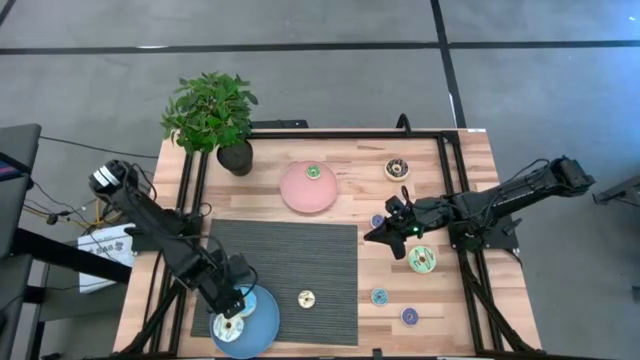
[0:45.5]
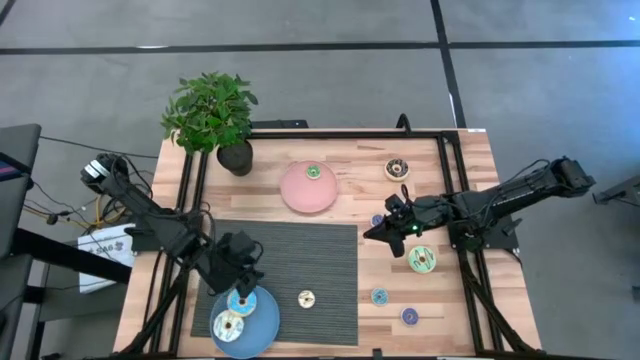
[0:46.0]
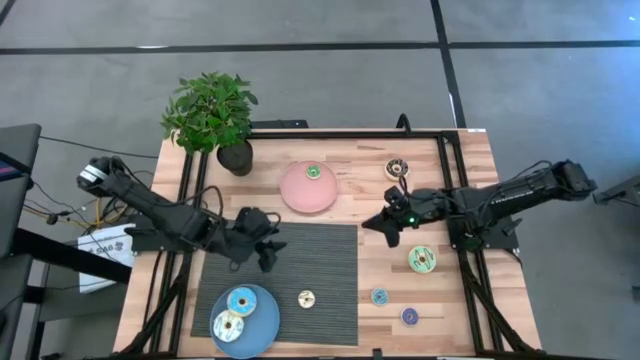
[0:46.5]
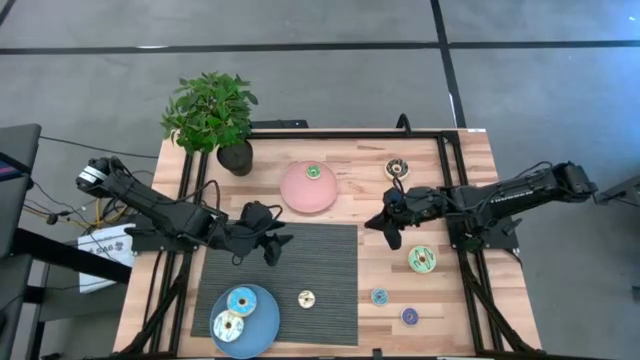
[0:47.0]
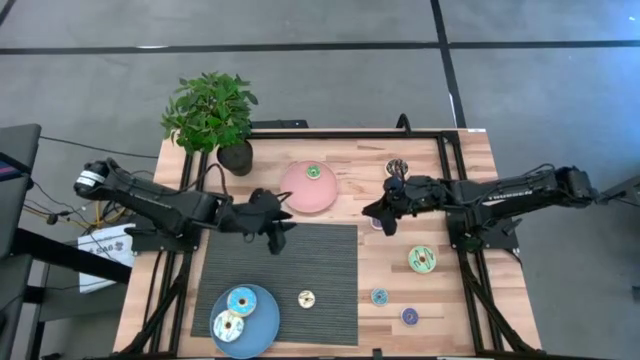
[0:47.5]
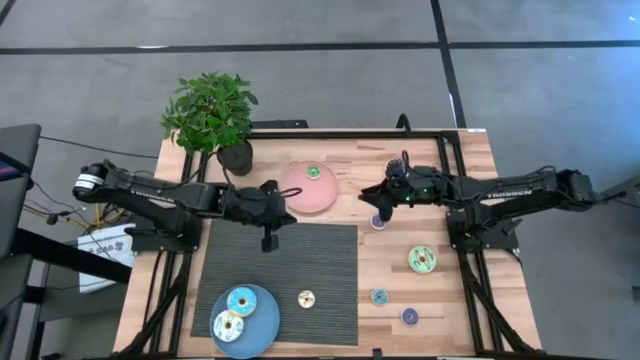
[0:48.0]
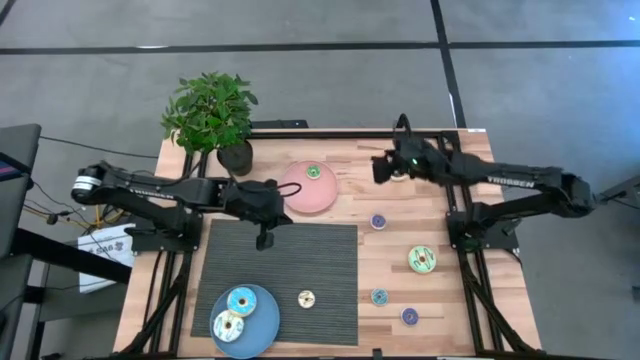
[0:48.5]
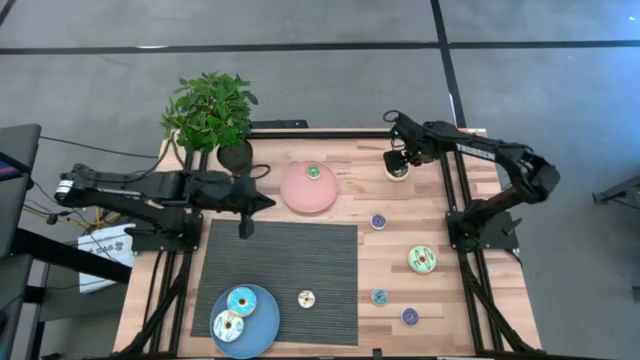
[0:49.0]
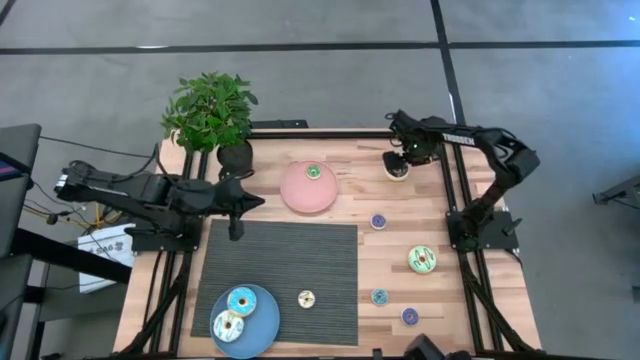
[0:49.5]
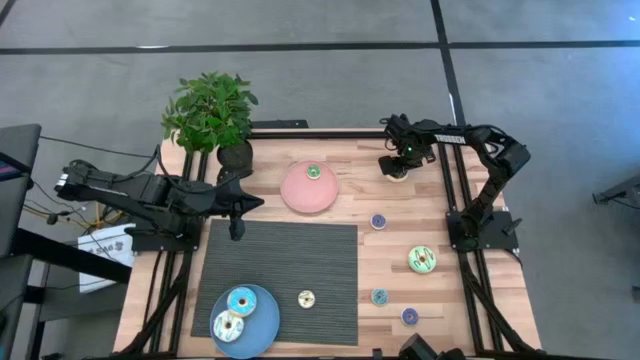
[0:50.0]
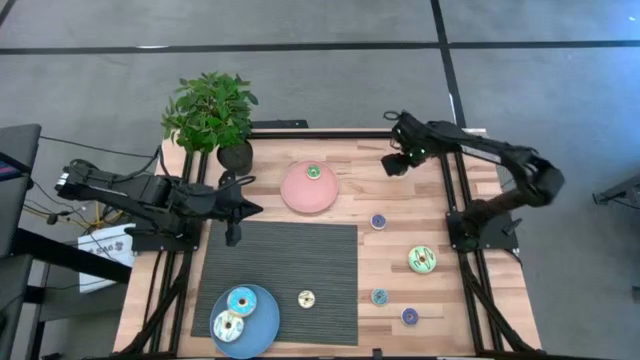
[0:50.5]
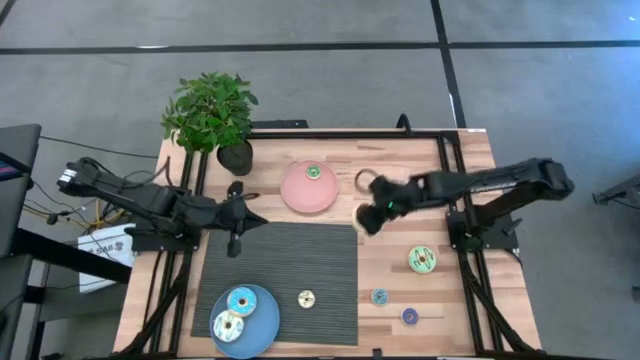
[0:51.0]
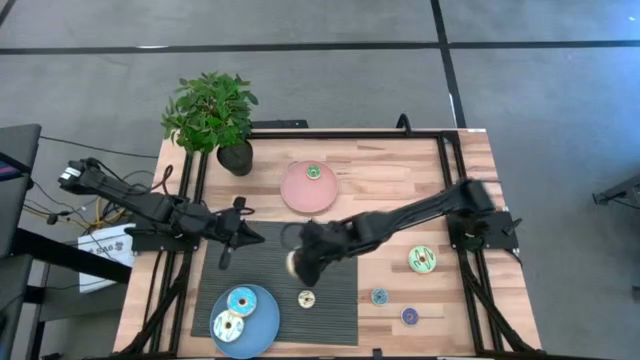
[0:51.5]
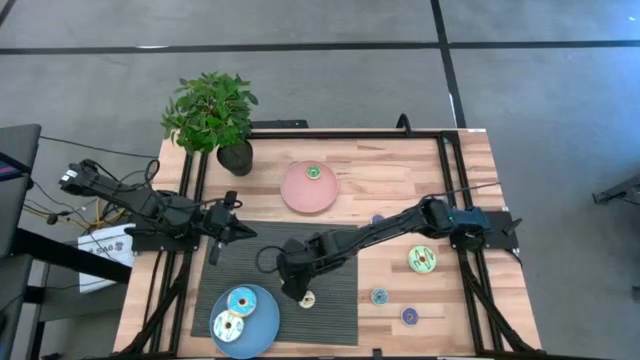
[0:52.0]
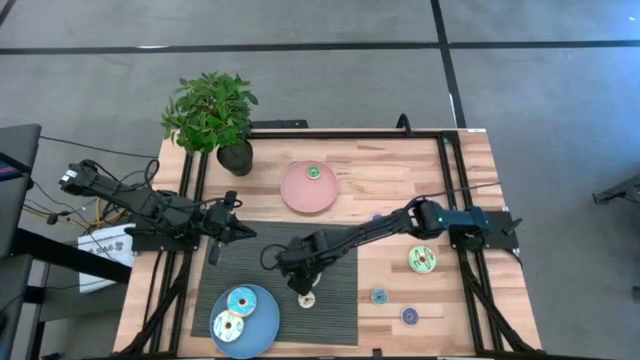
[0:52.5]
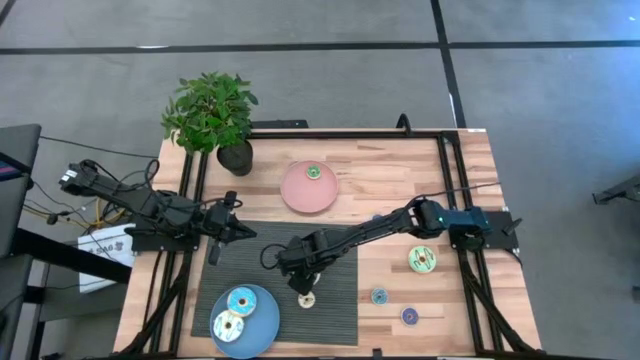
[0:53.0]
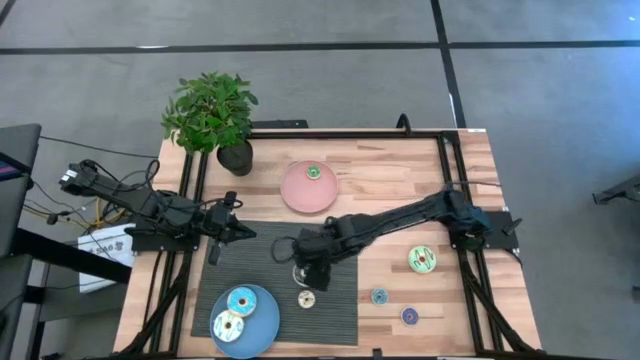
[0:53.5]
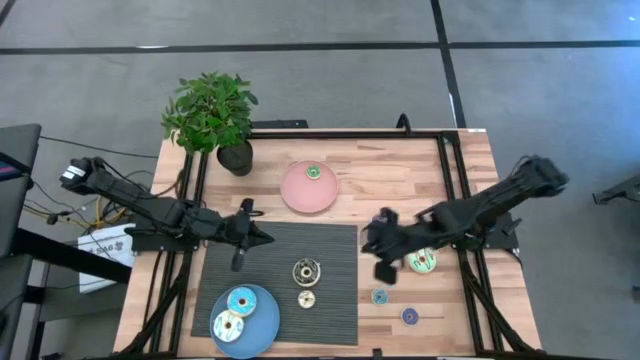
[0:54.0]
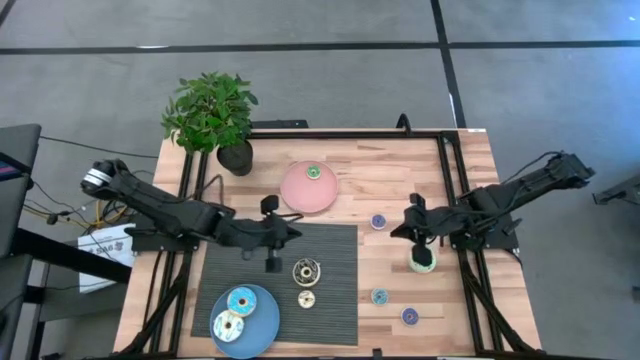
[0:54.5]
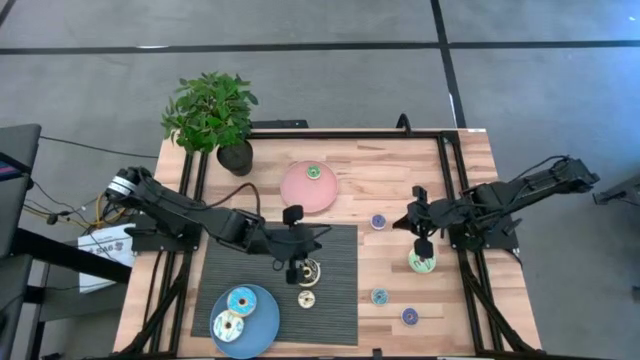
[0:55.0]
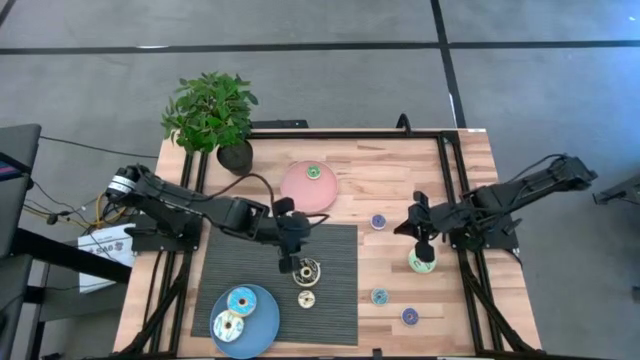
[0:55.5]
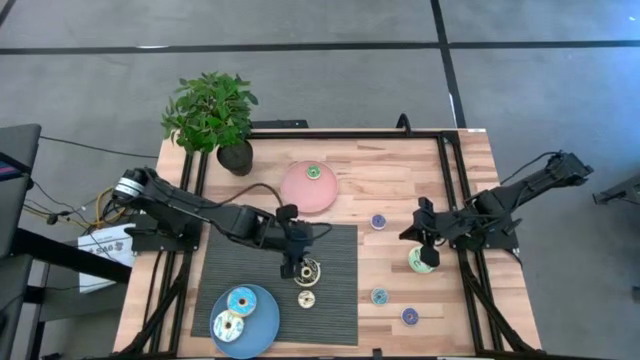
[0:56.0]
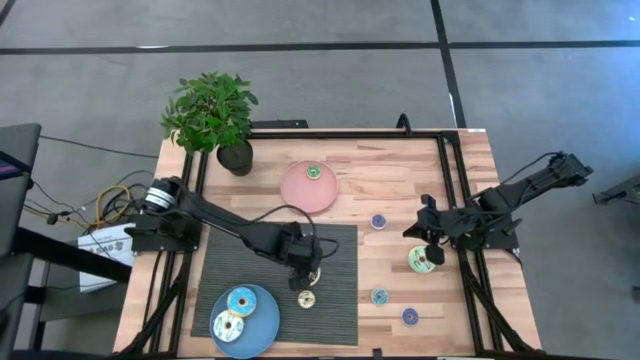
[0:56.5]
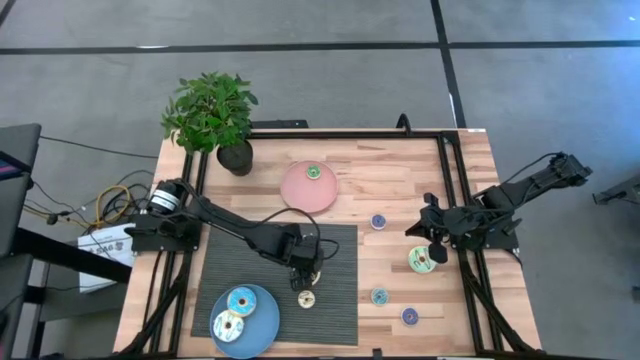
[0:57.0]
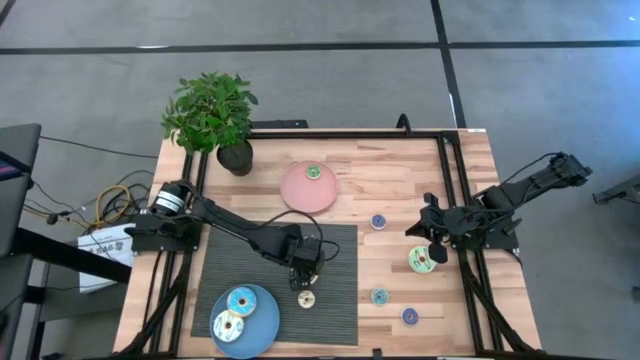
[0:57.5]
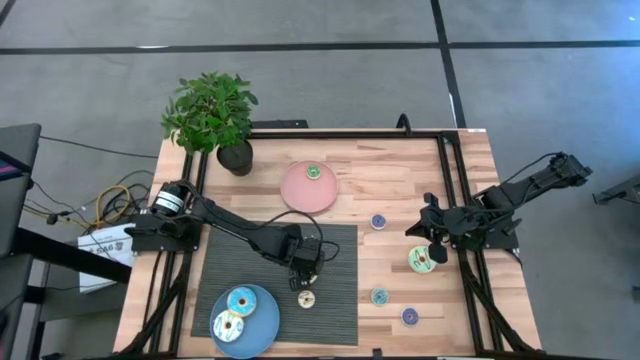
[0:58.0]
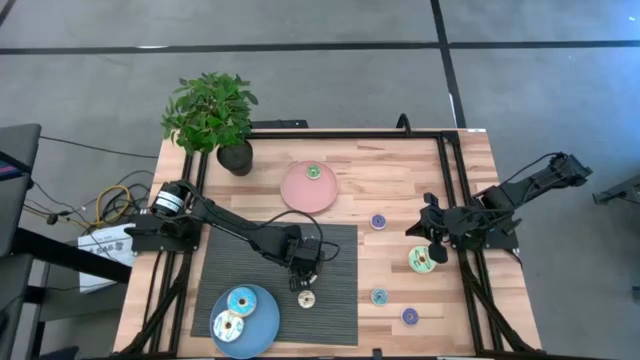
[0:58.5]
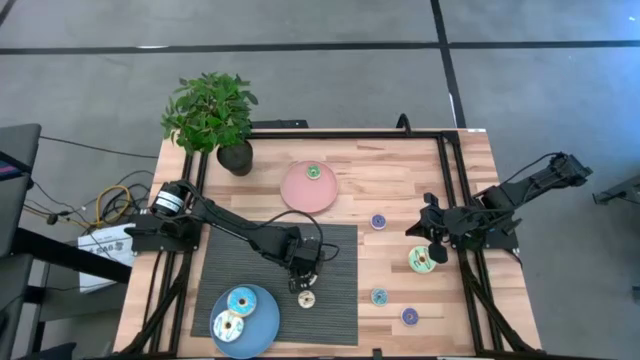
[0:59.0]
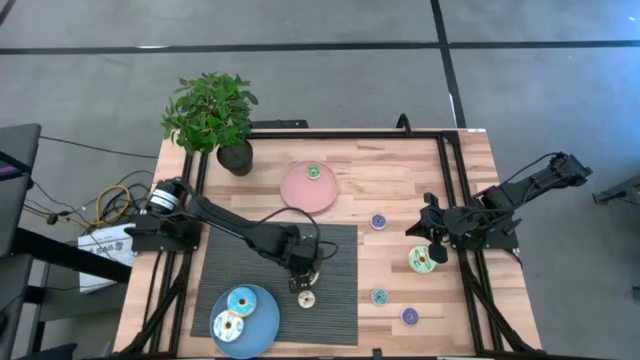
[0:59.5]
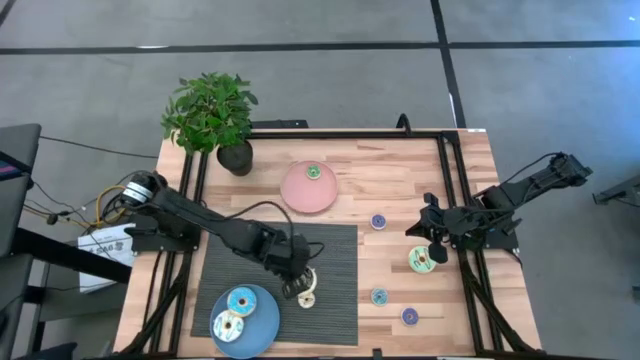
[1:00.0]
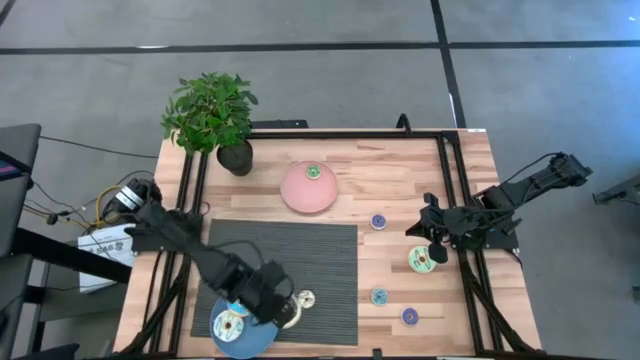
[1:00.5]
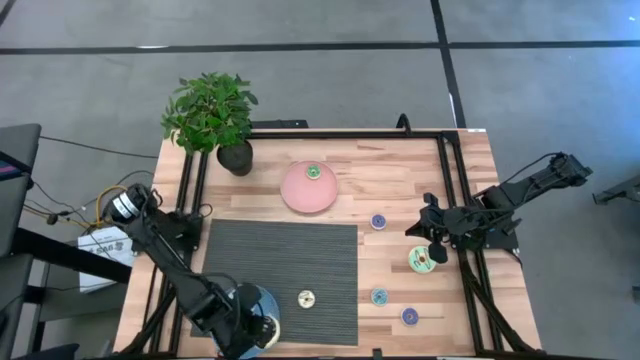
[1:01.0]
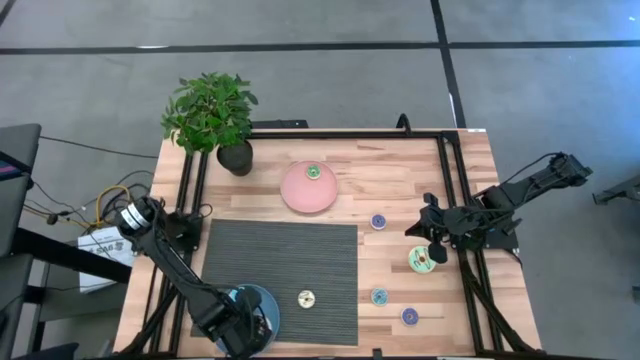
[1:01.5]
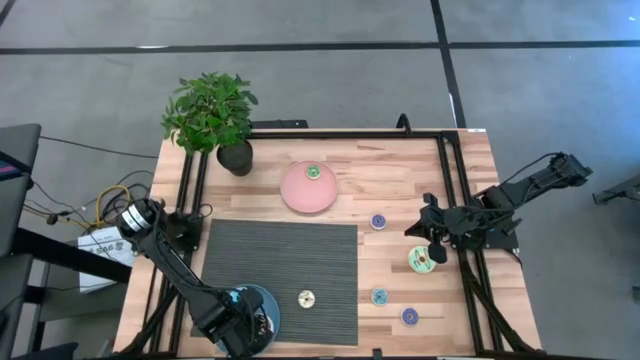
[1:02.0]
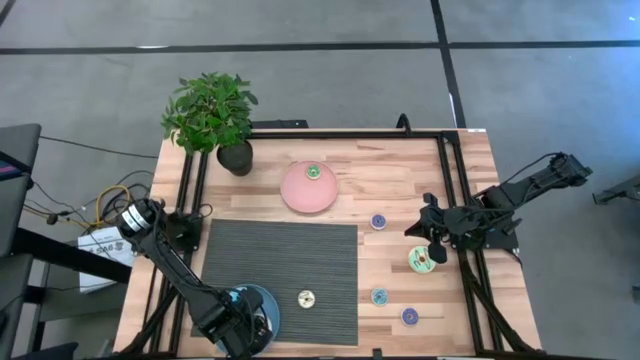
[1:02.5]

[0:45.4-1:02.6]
Task: Pick & Place donuts
Put the big black donut on the blue plate
